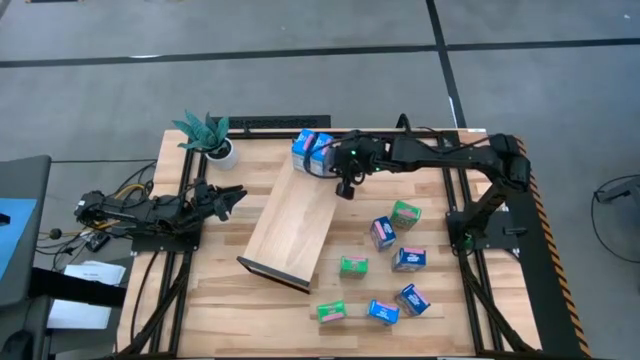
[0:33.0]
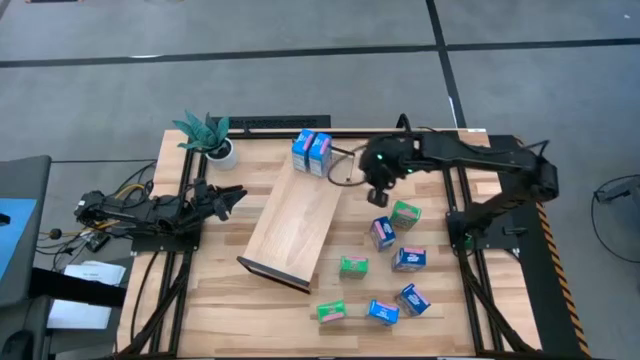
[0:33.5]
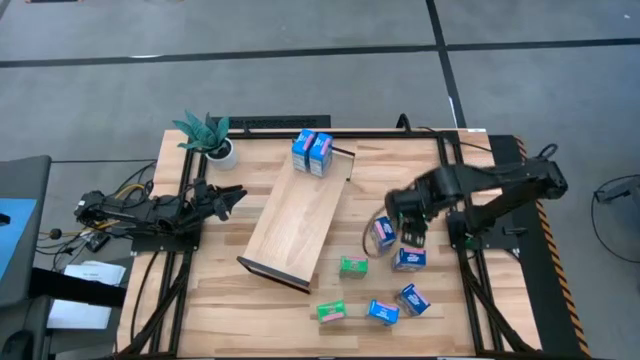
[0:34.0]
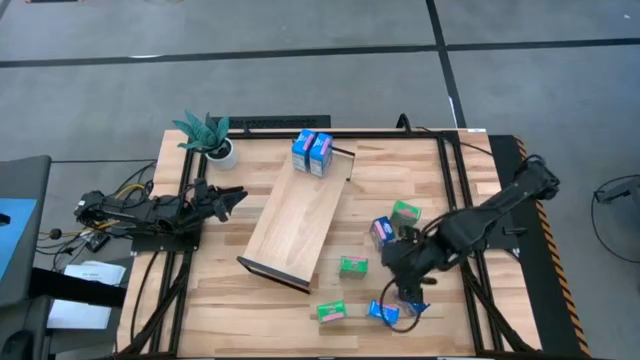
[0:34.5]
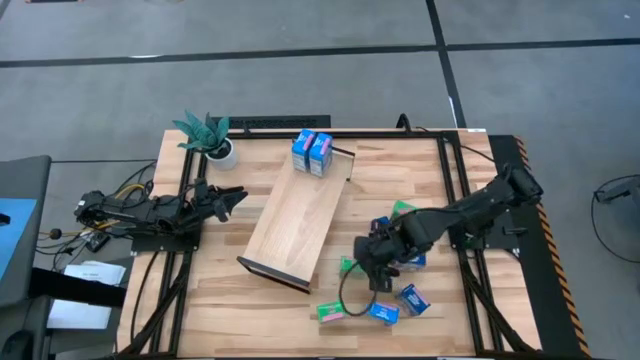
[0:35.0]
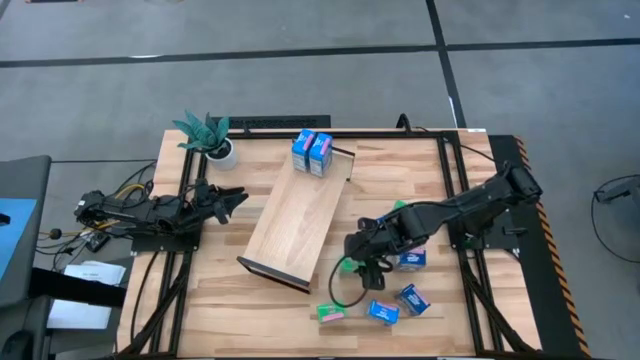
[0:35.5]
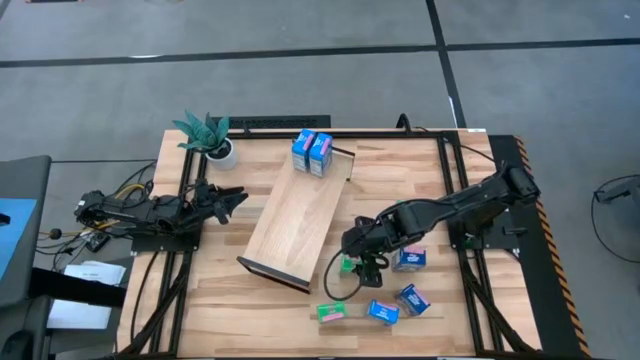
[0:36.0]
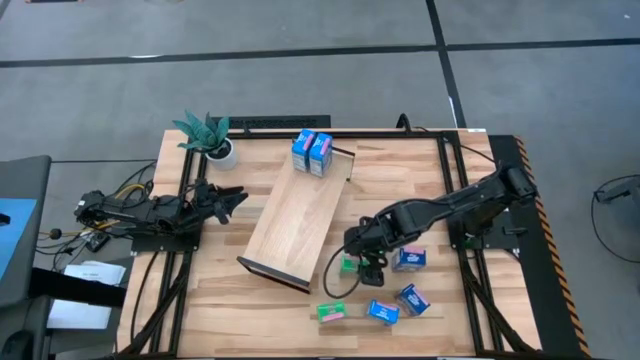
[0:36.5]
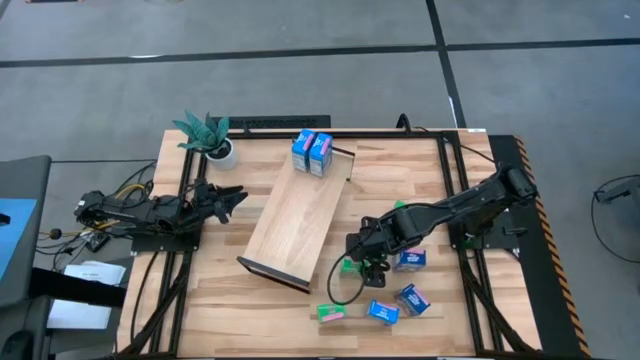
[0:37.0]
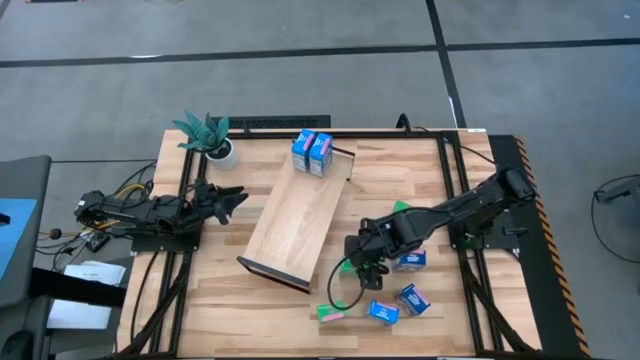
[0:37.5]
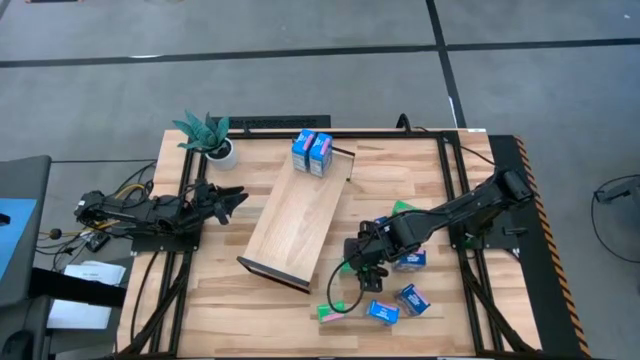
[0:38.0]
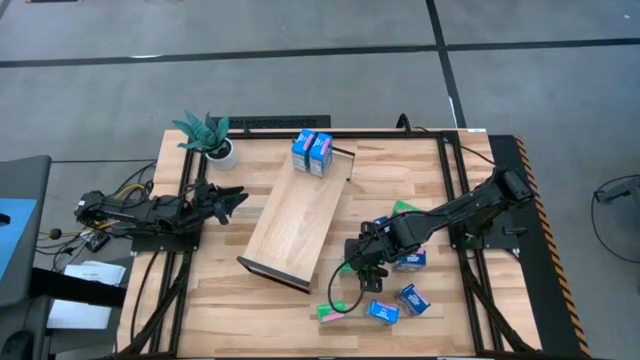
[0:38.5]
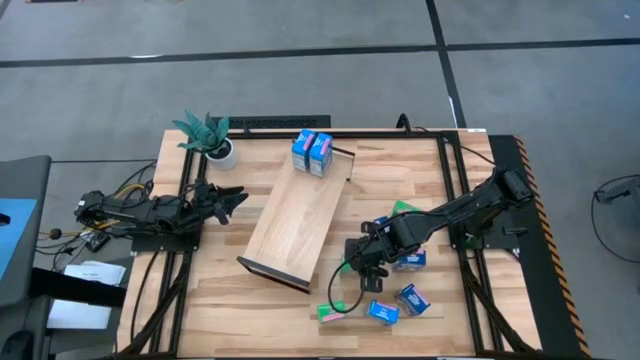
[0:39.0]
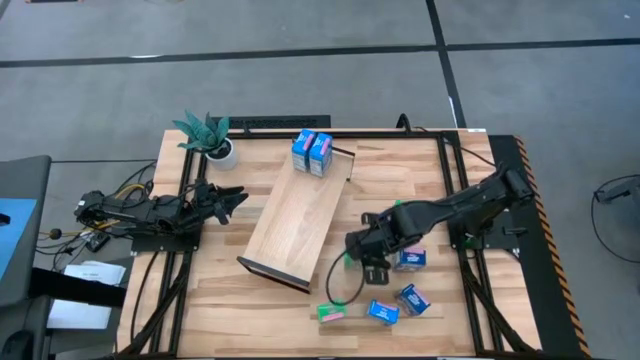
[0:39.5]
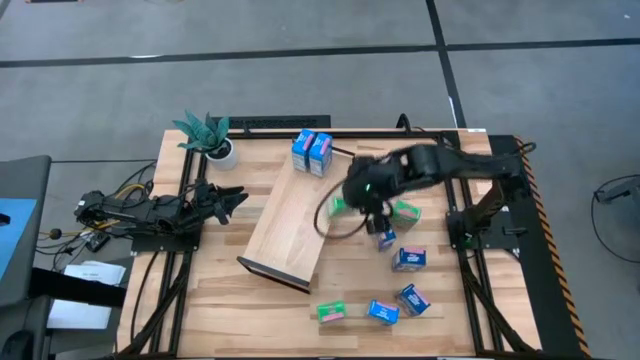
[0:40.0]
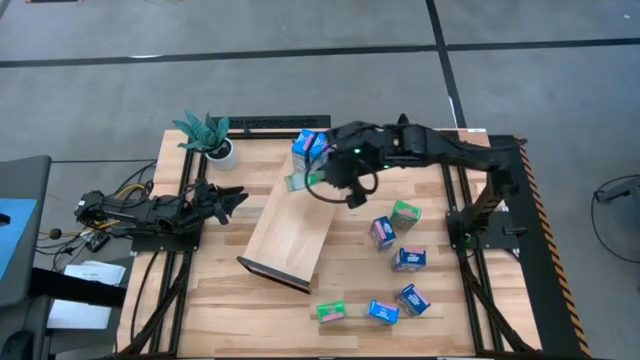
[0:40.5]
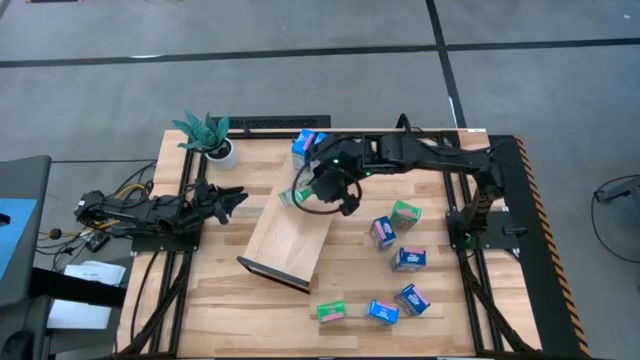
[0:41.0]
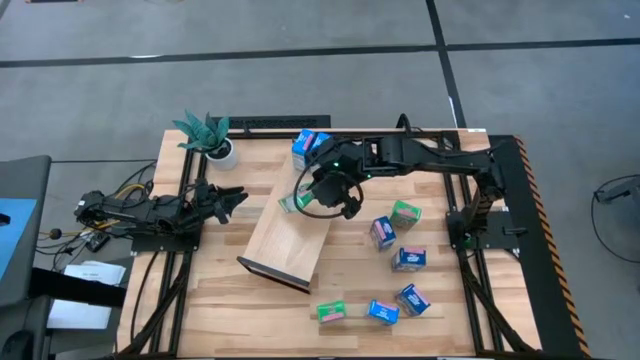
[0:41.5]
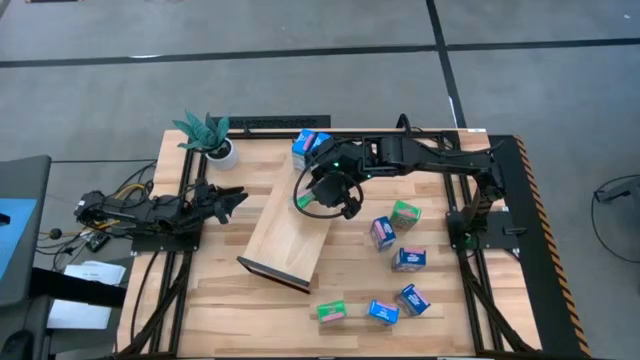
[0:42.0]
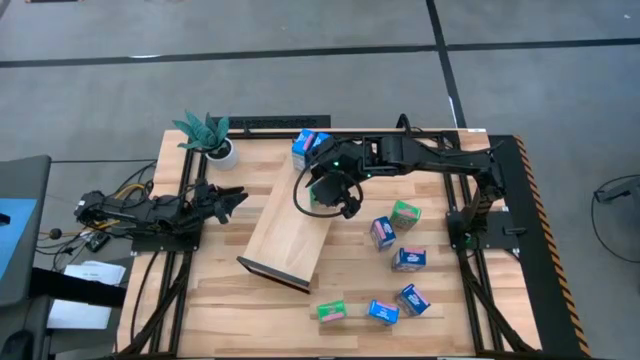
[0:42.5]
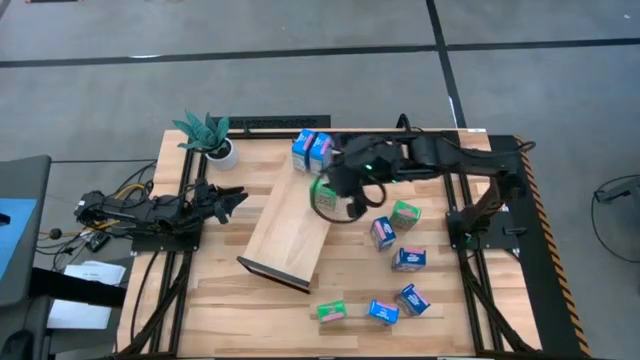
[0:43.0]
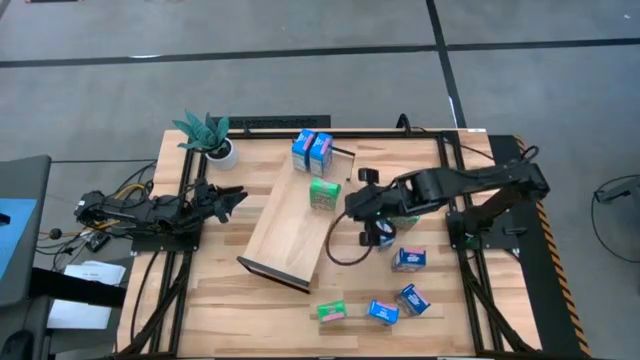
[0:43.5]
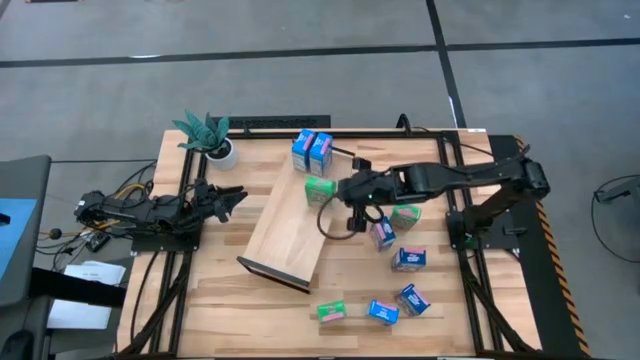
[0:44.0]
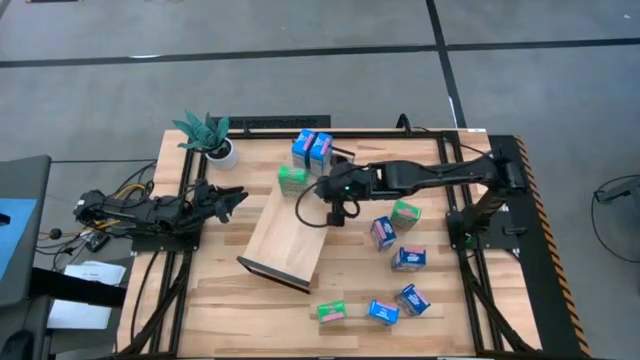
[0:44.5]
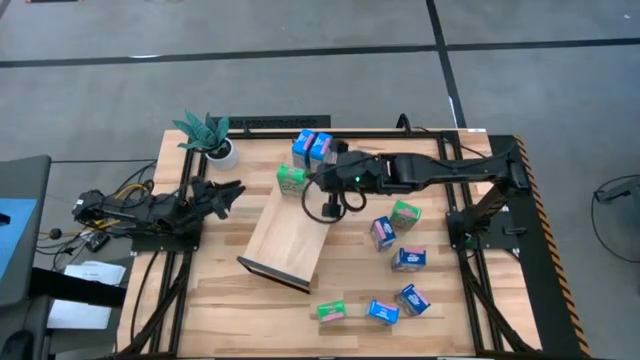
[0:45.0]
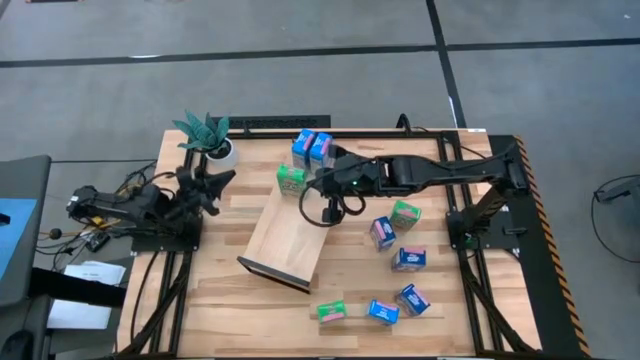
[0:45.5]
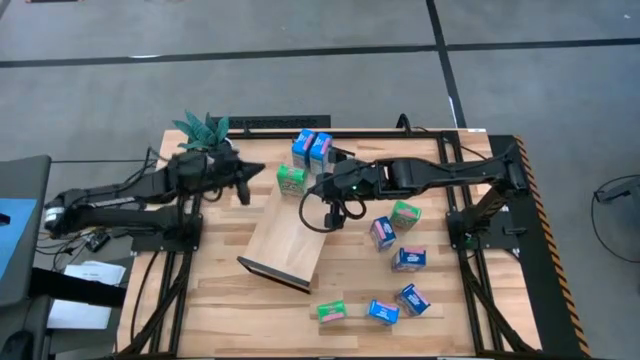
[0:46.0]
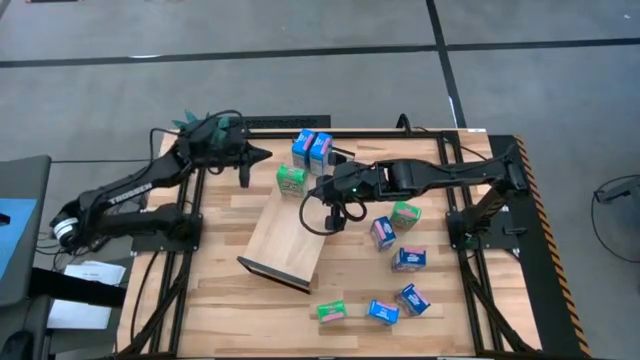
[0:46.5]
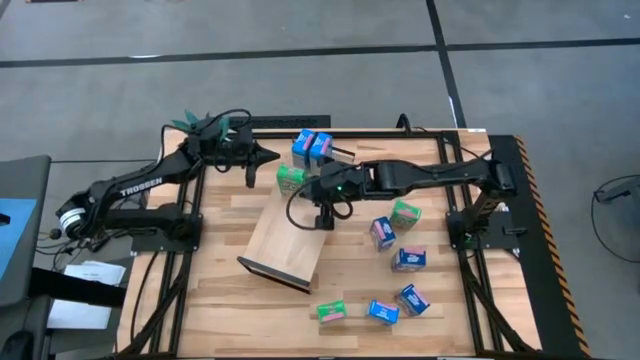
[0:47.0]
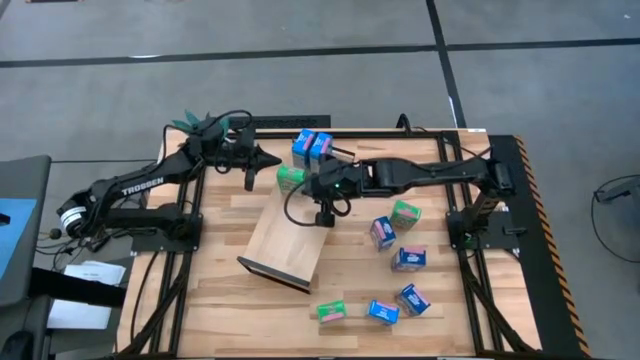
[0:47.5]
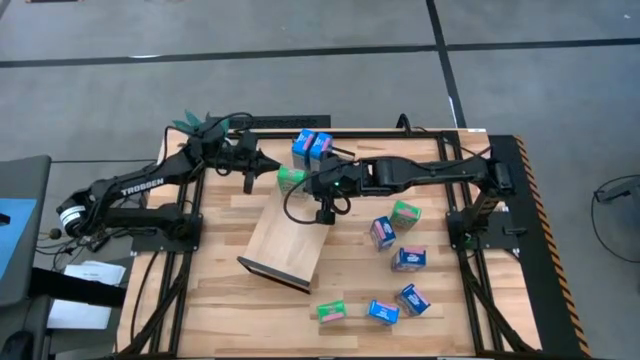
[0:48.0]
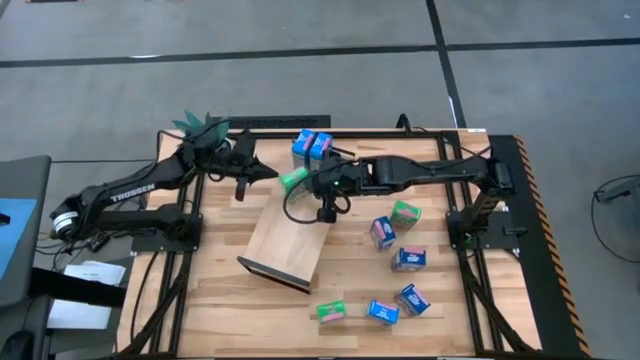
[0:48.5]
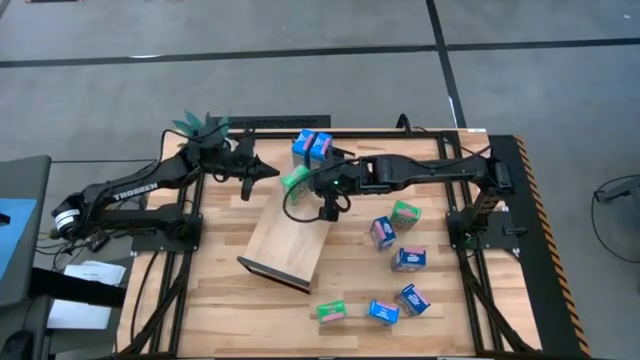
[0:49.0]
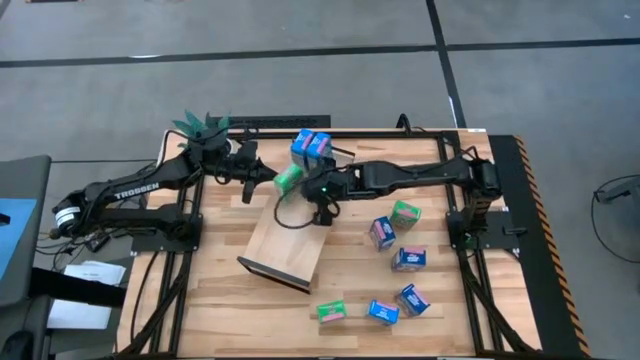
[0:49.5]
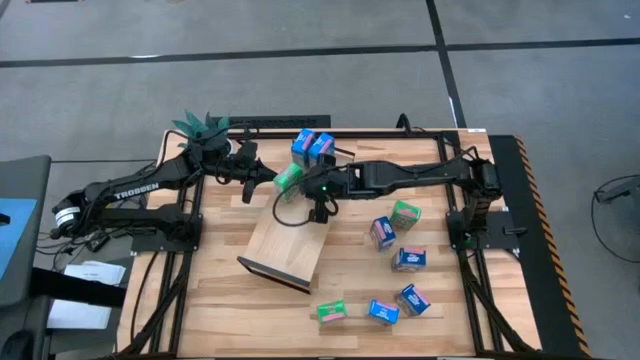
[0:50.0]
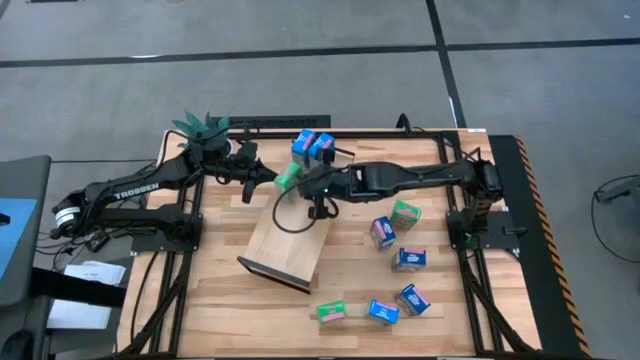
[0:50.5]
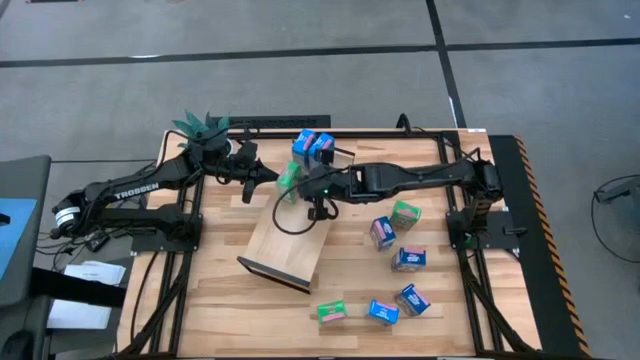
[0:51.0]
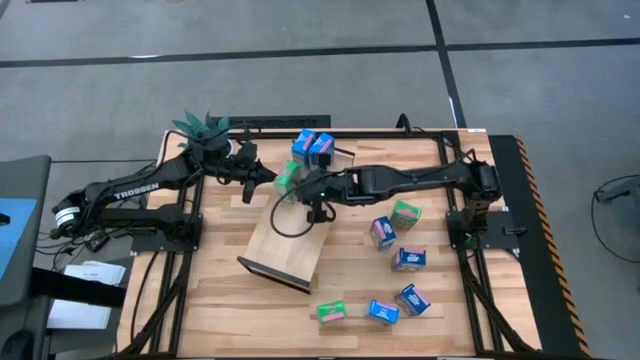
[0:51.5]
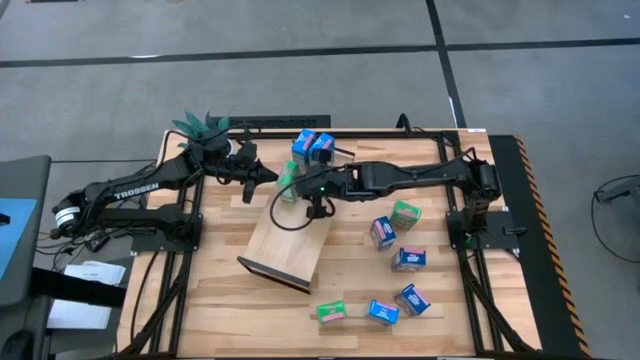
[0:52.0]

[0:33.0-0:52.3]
Task: Stack cereal on shelf
Put the middle green cereal box on the shelf
